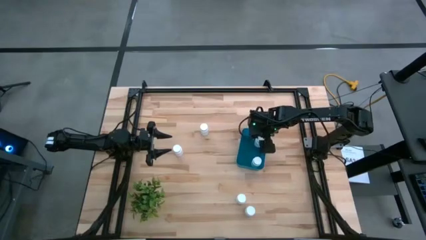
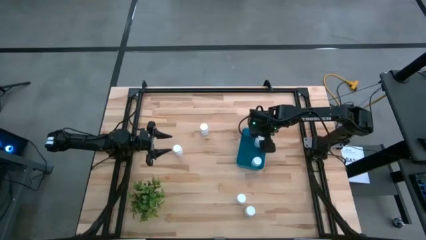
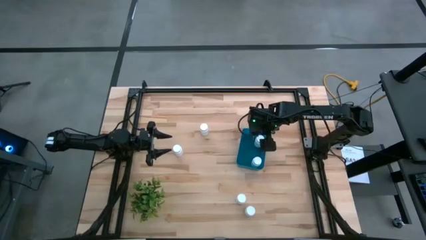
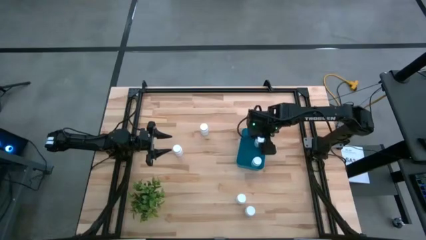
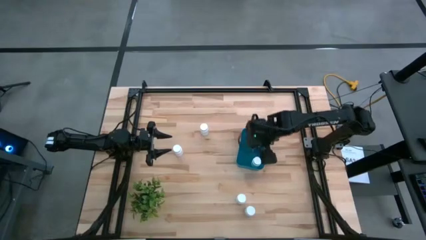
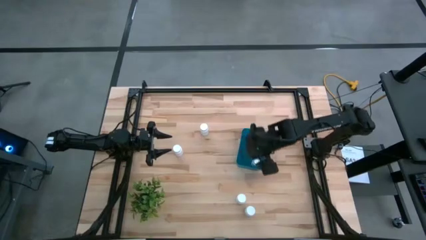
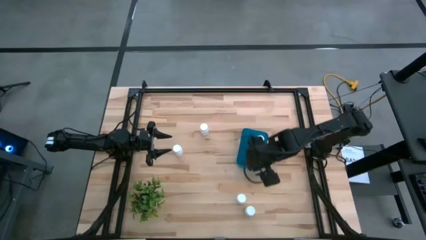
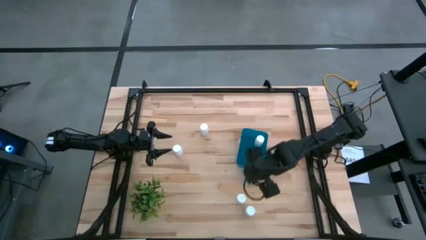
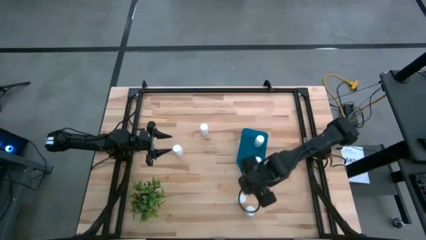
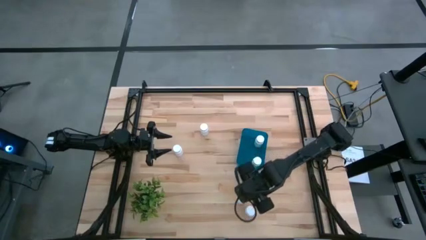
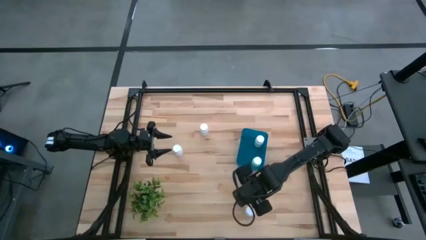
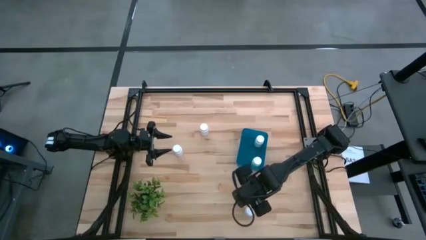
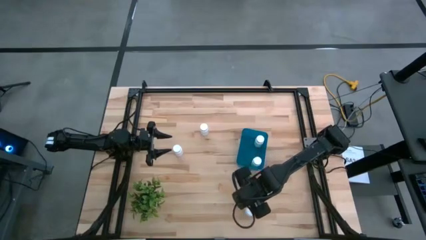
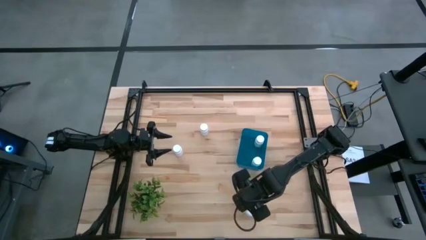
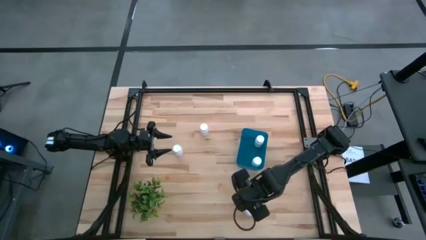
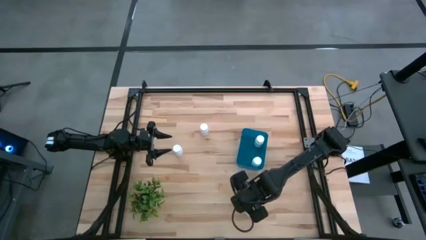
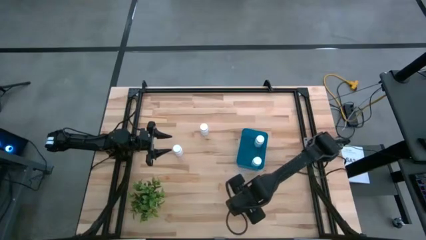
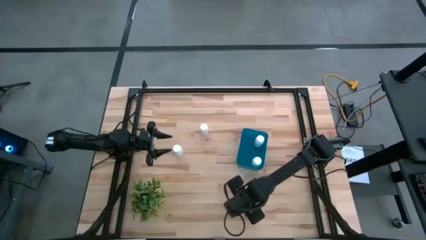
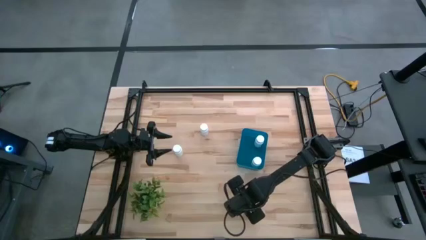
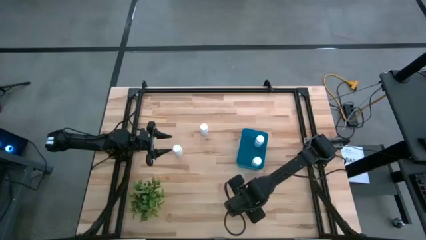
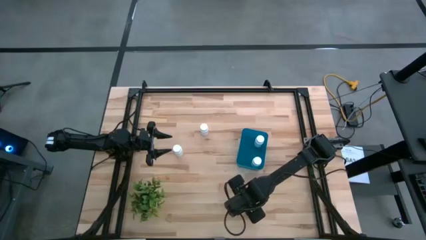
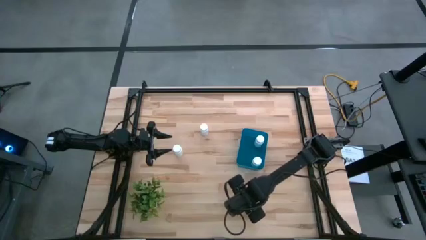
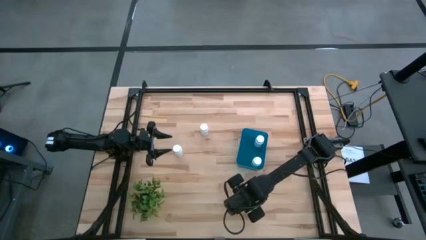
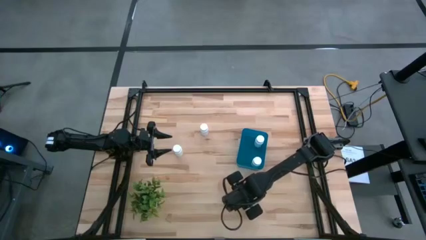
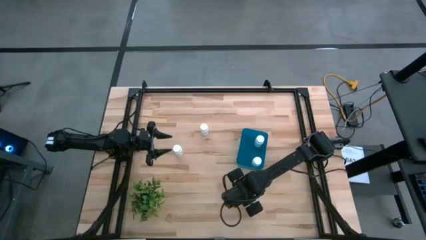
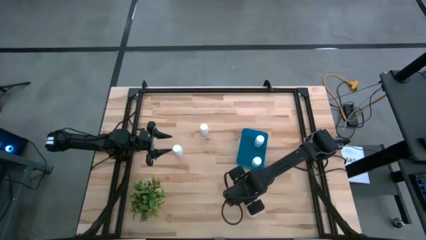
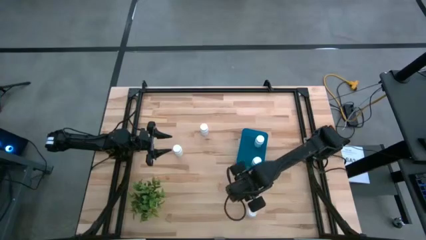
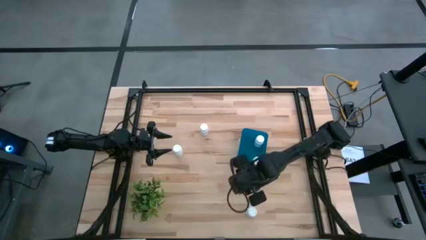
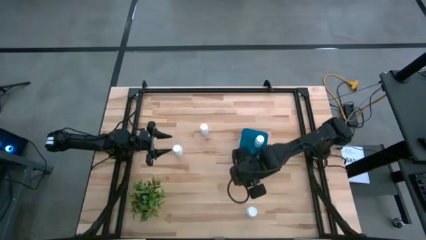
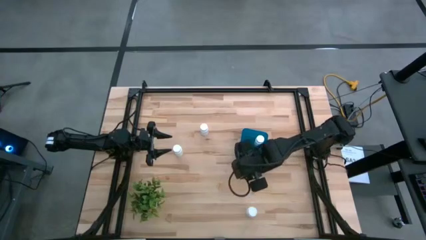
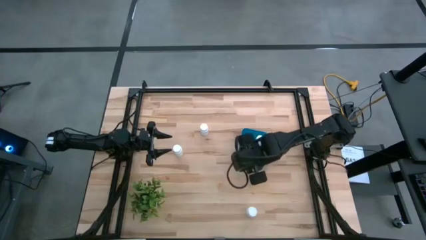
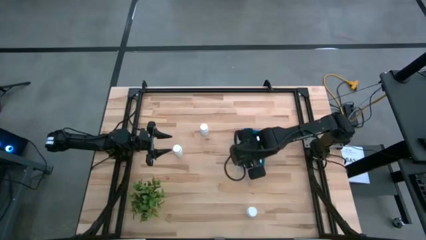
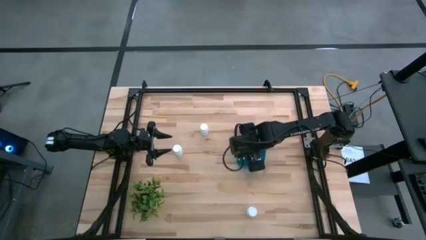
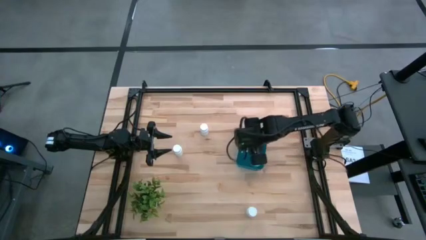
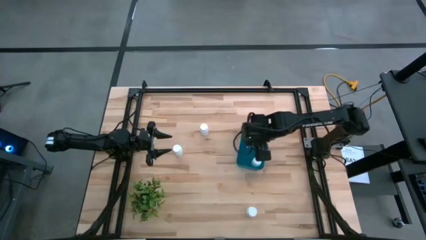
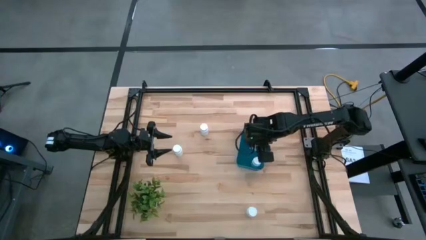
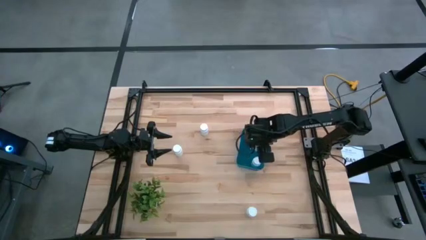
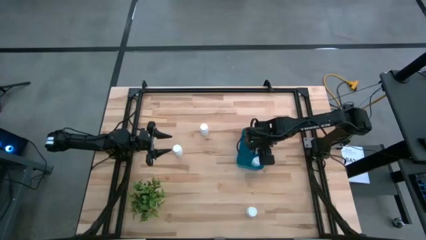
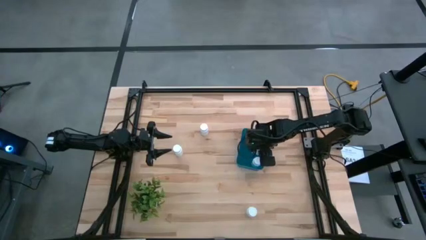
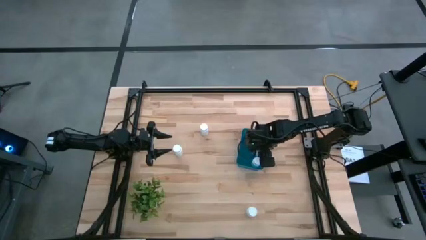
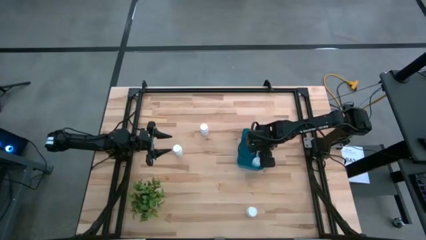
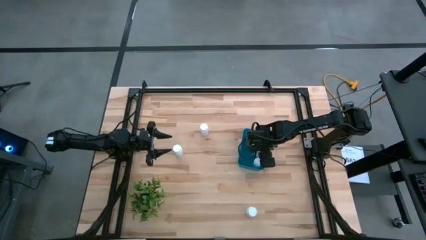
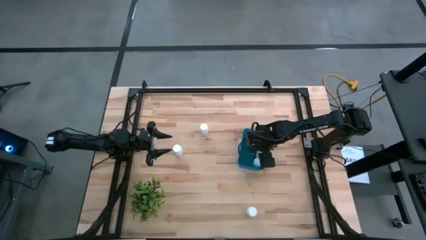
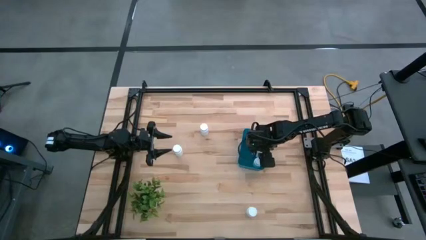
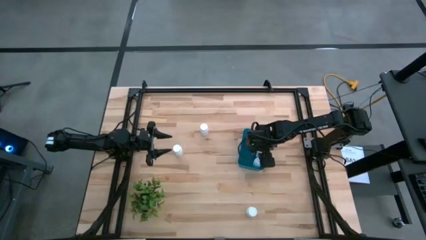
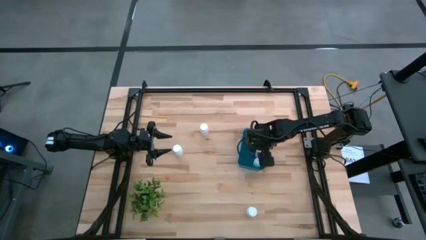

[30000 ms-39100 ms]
Task: Pick and place pill bottles into a basket
Put the white medicine bottle into the blue bin

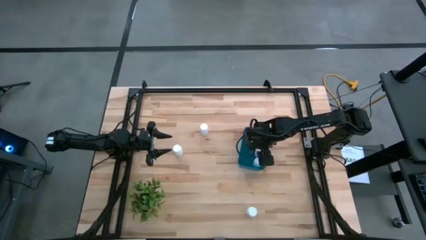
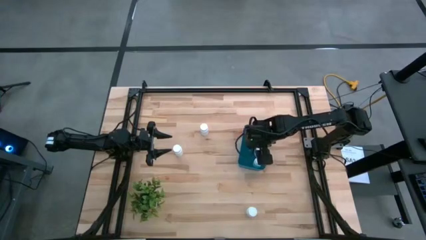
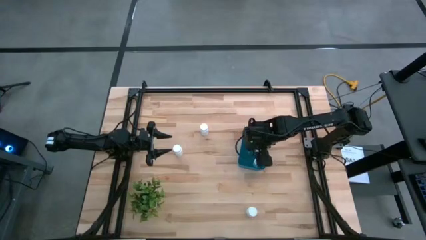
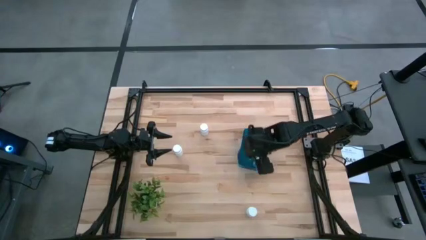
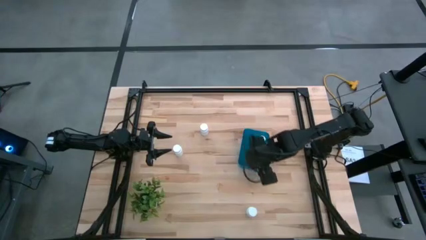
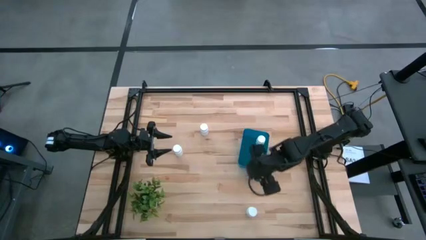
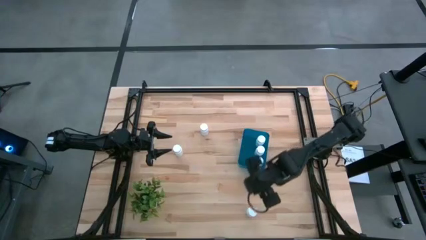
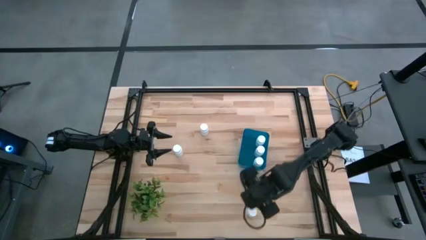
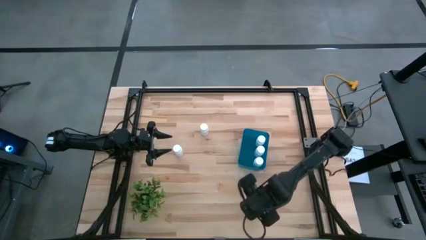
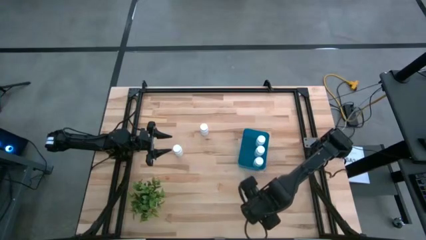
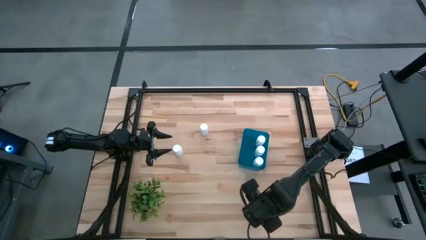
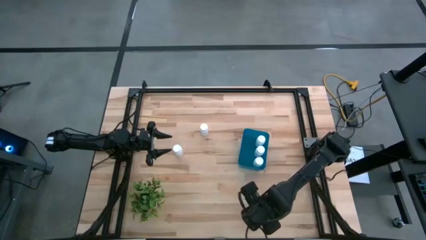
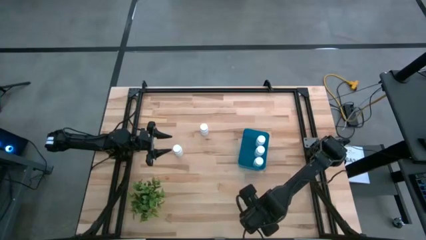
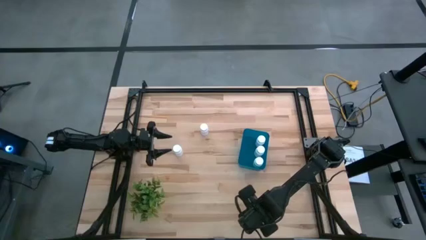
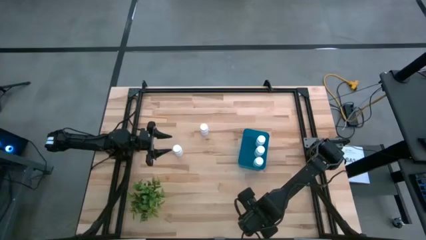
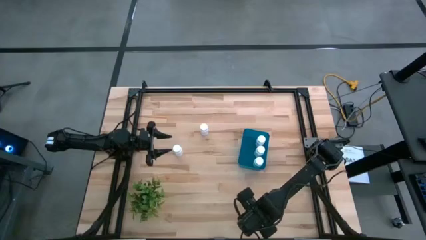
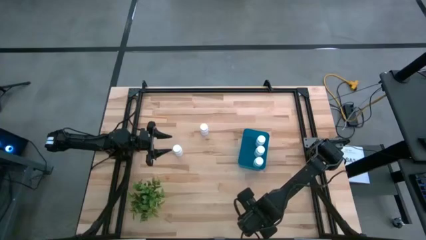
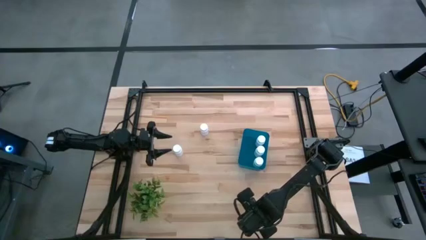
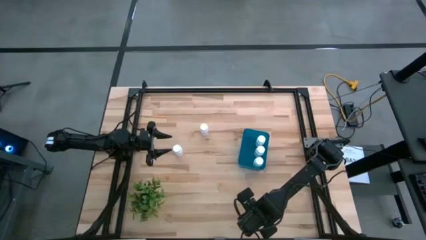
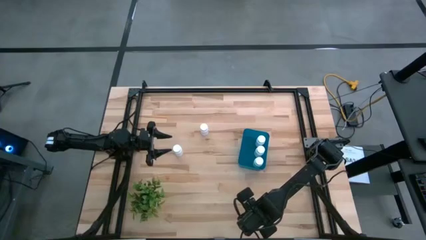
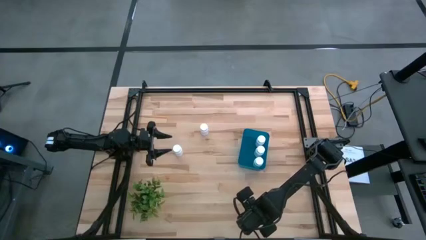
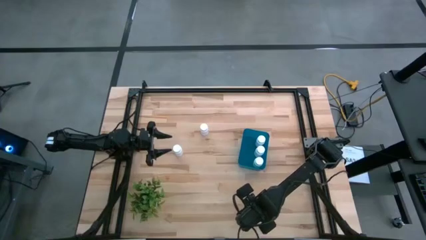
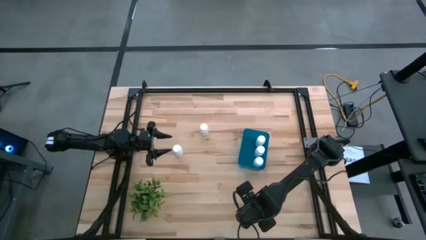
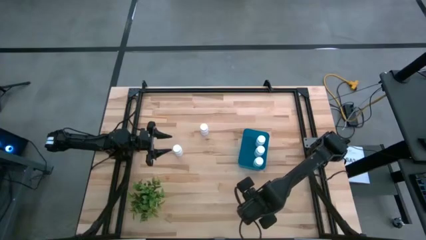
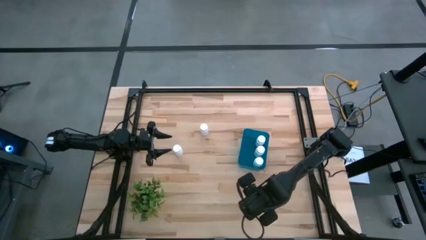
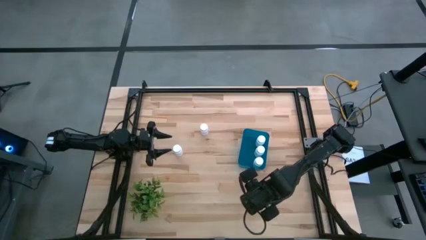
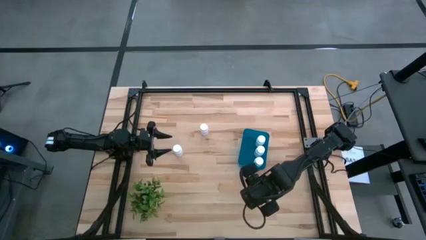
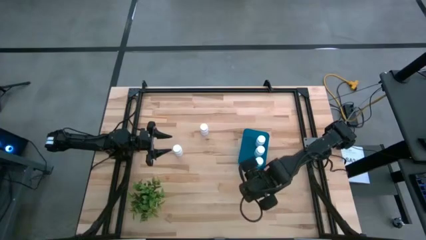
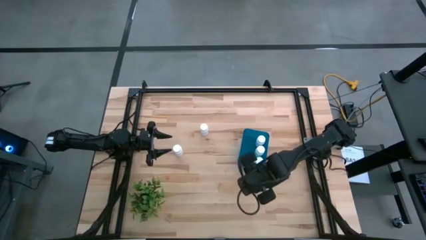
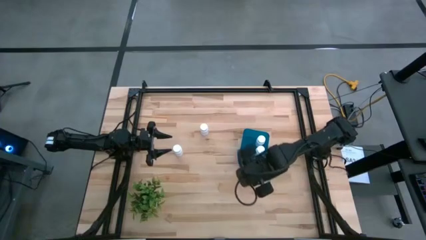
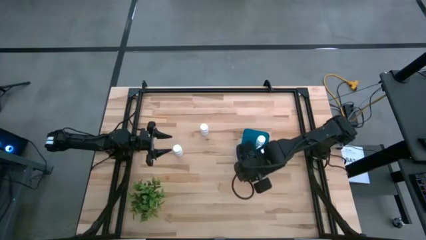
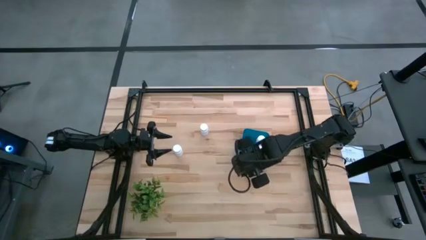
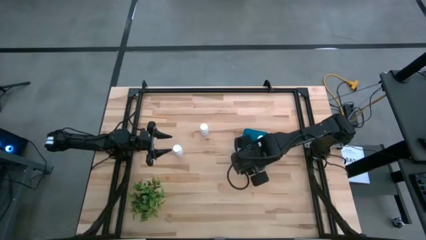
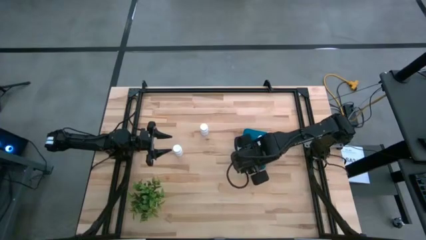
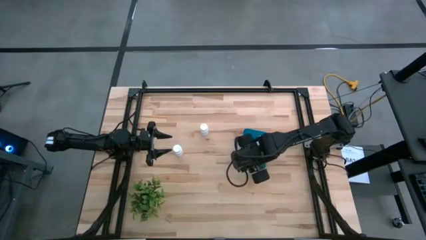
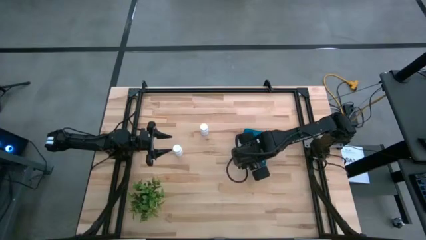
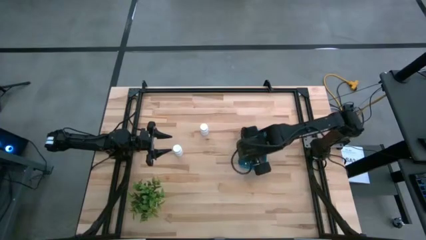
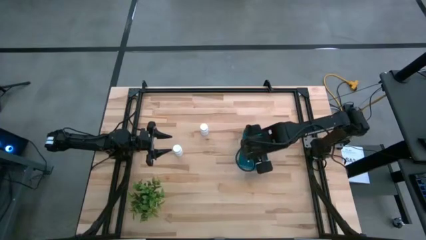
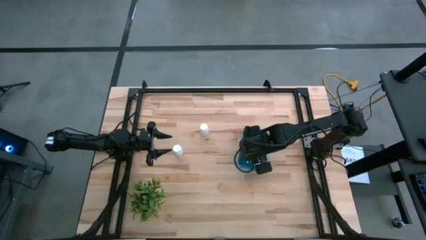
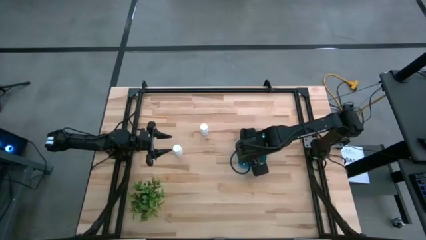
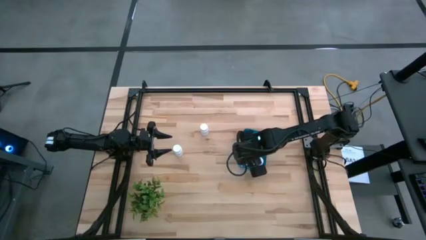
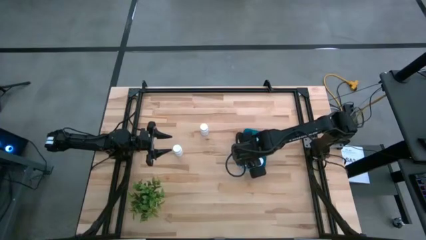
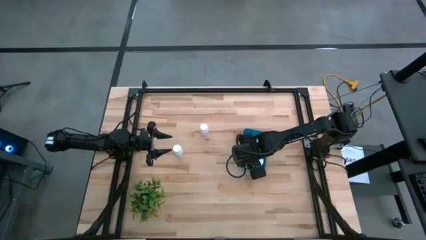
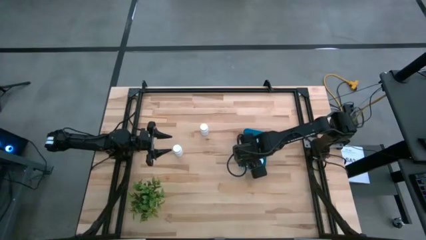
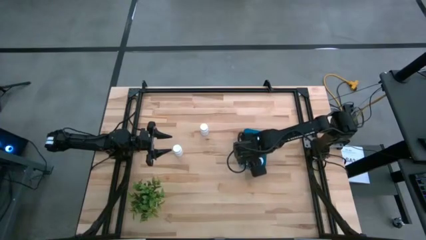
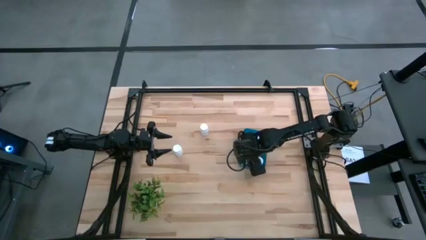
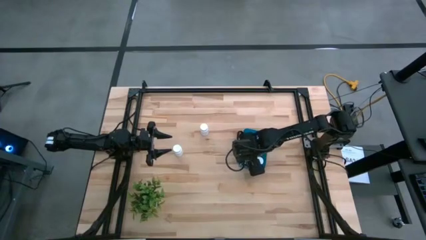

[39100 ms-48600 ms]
Put the white medicine bottle into the blue bin
